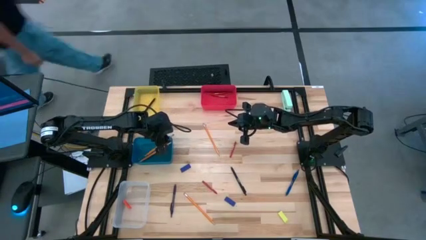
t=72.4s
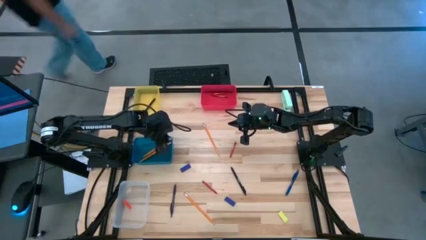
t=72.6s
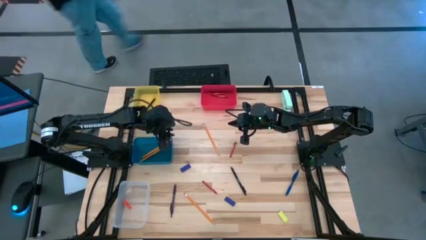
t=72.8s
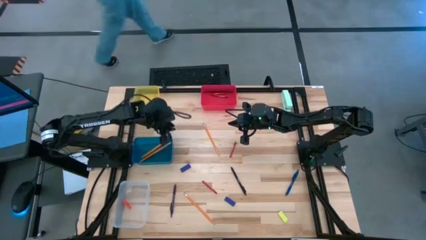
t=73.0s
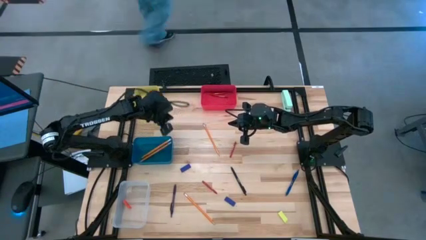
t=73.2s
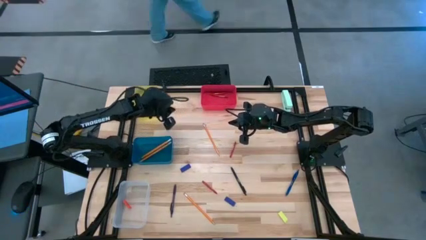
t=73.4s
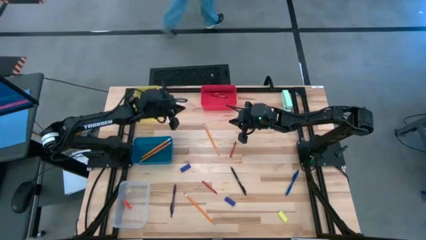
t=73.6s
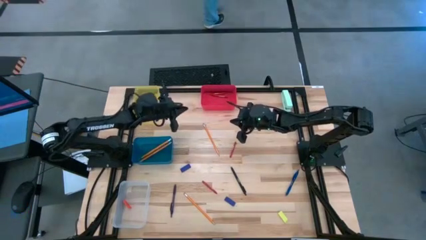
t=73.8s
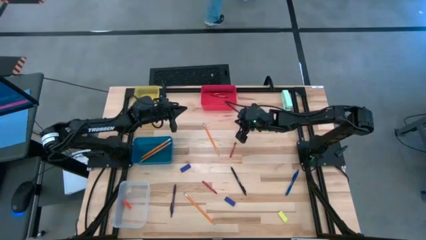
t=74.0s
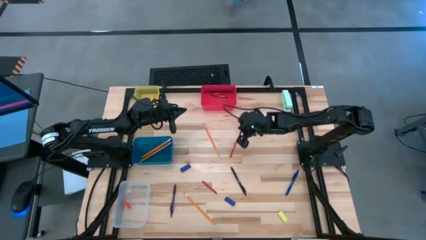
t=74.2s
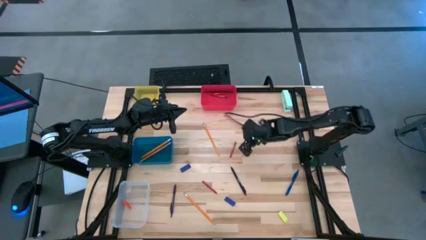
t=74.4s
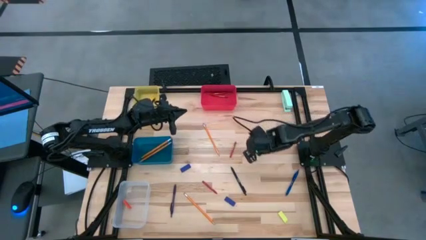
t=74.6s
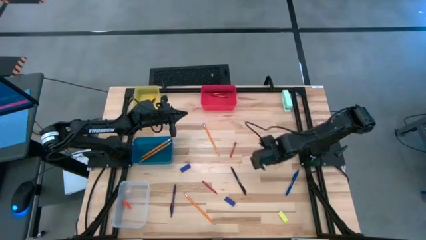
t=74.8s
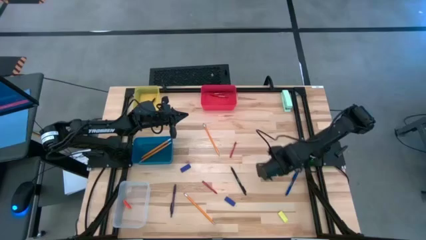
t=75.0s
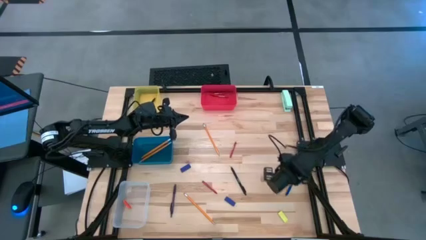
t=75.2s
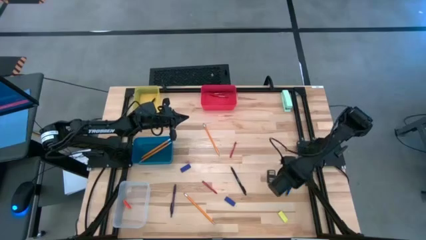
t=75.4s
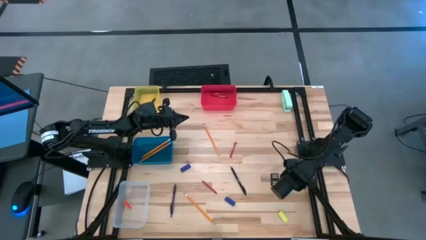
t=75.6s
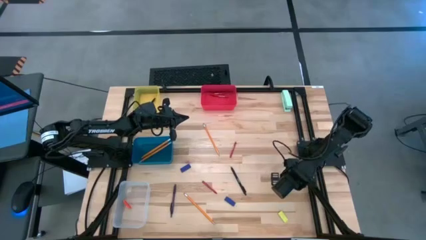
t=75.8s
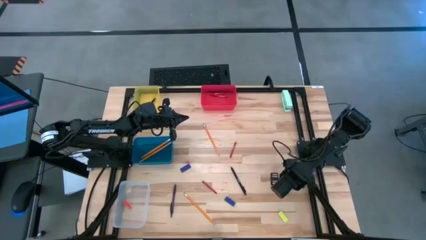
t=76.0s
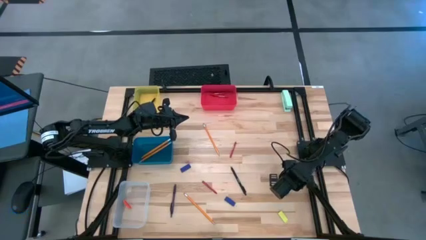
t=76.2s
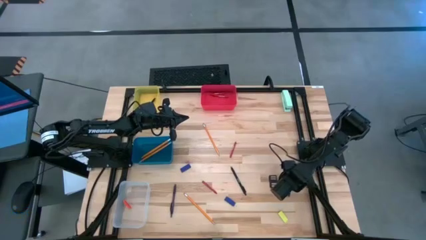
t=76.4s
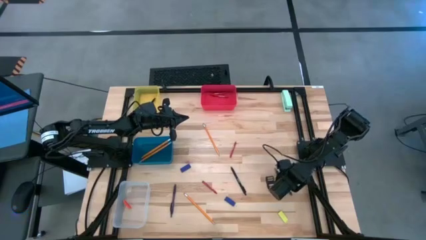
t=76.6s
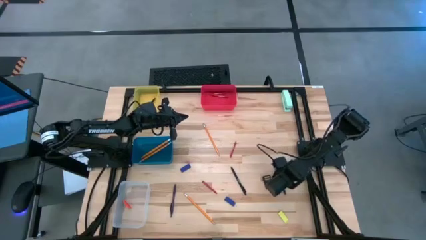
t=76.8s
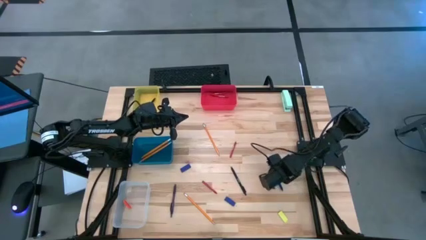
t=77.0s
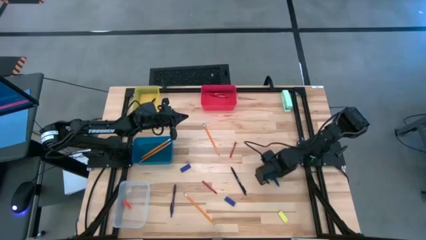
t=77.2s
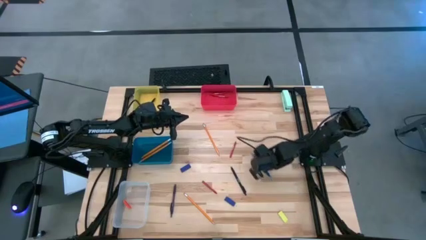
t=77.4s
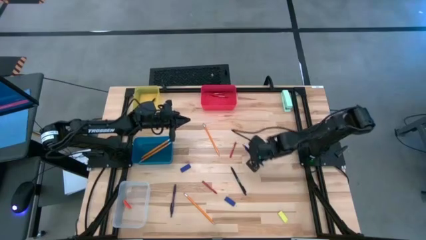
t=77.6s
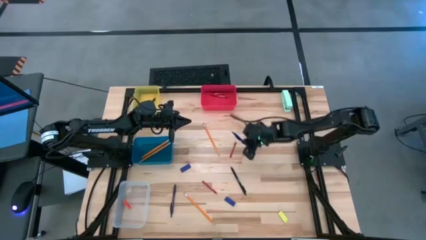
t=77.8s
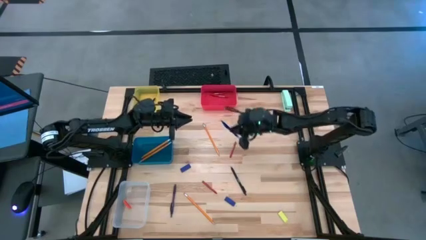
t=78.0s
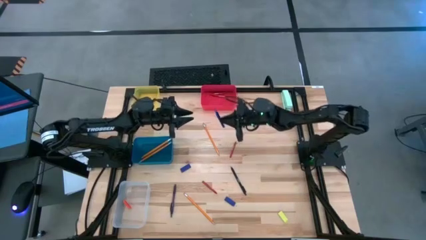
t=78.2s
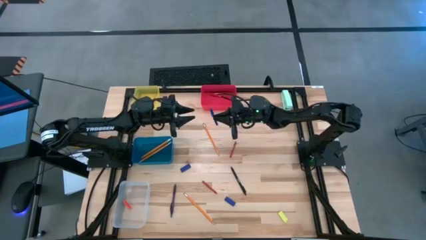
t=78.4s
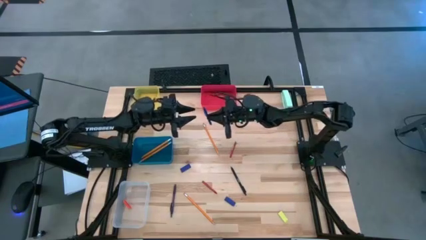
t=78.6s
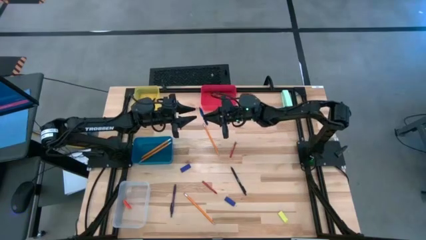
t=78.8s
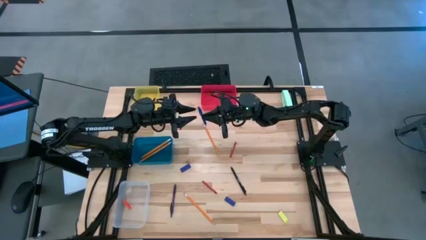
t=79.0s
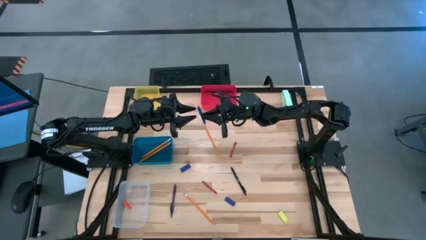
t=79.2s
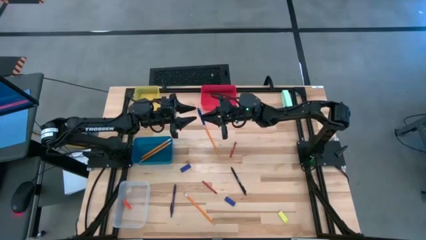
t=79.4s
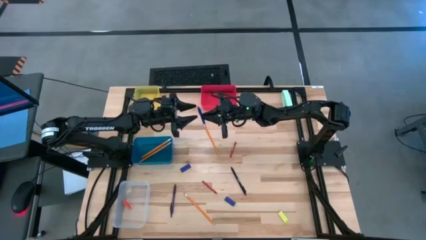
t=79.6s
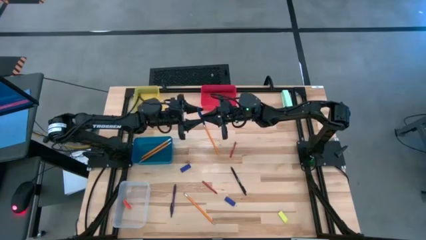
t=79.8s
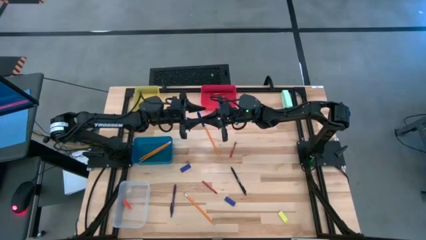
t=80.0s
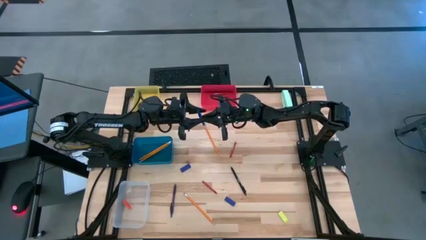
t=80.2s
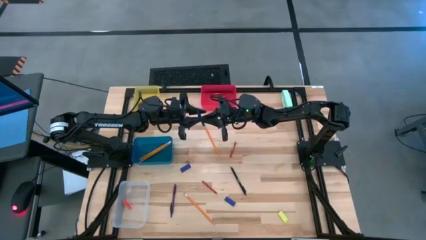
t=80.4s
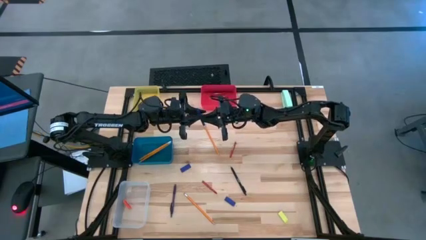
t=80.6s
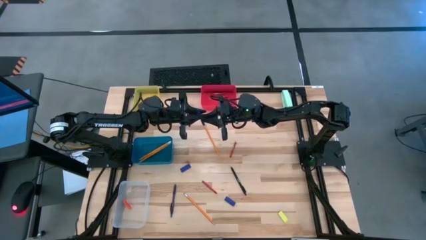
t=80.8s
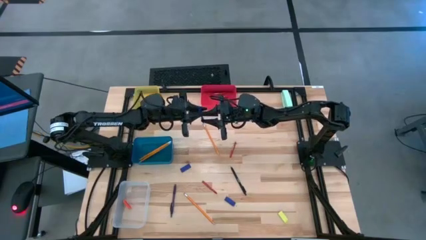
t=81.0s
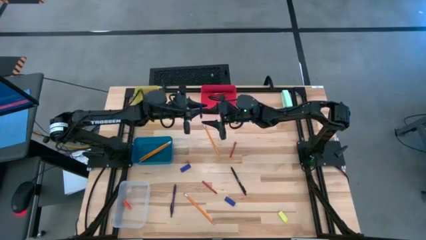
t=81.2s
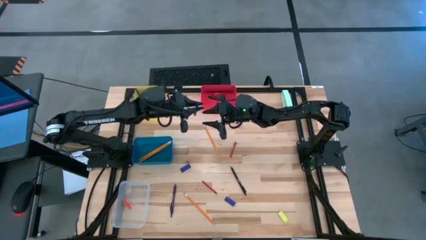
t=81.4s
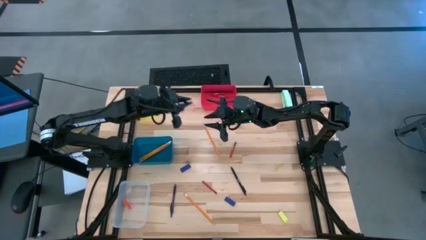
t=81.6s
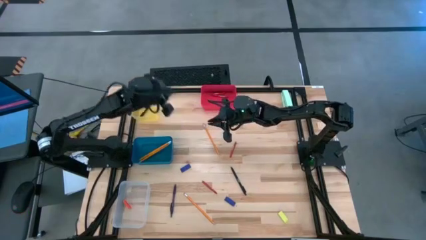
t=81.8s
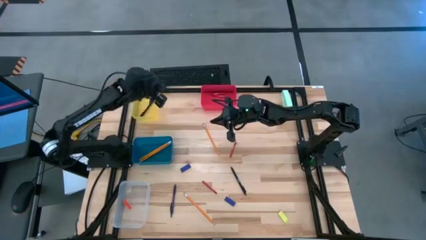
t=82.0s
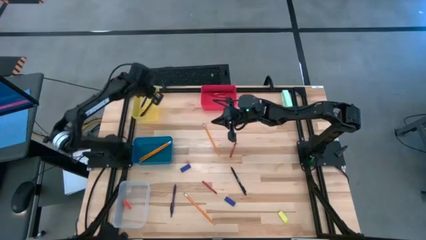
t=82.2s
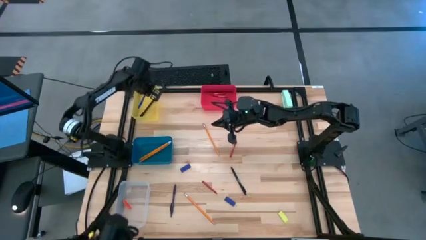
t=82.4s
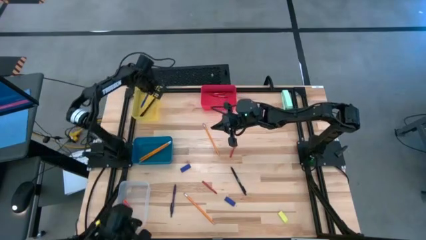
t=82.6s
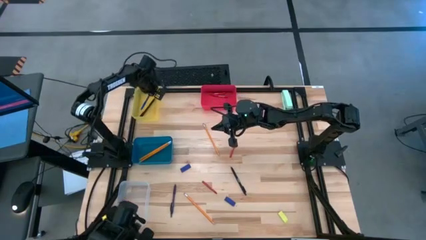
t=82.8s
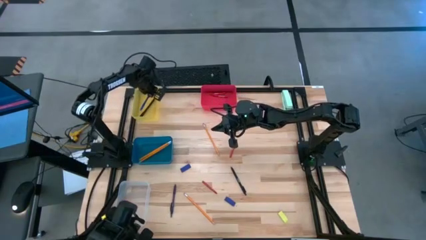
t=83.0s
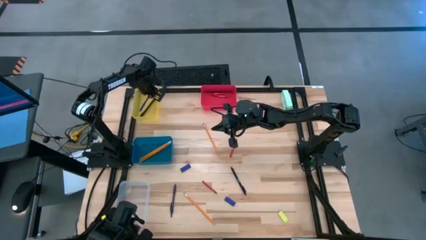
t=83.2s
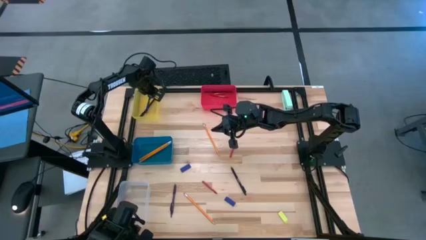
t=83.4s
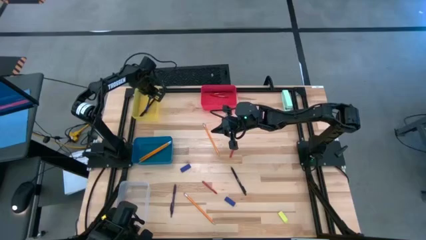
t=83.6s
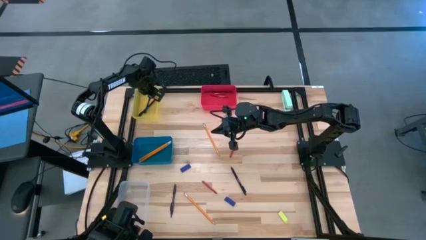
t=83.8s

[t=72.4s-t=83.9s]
Task: Sort crayons/erasers/pens/pencils in bins
Put the blue pen into the yellow bin

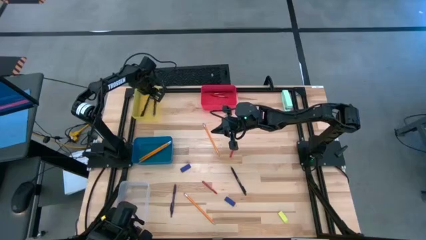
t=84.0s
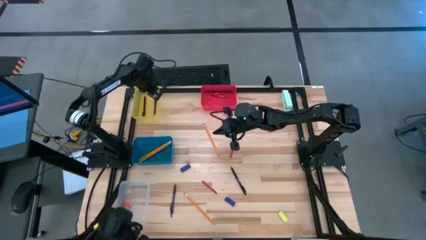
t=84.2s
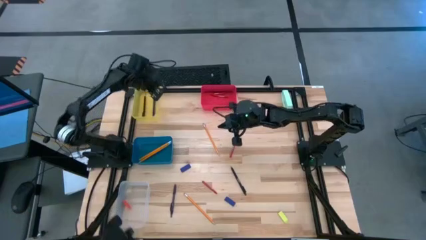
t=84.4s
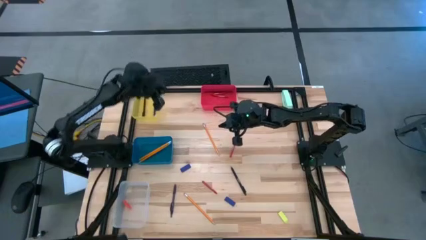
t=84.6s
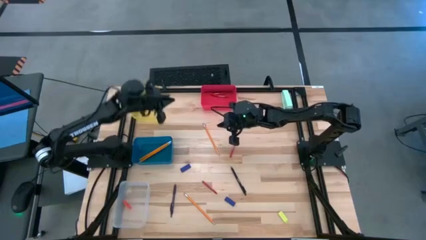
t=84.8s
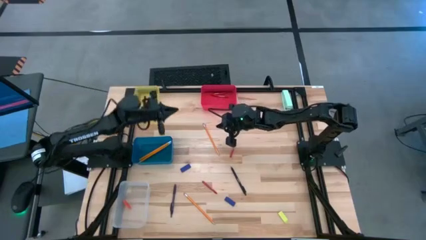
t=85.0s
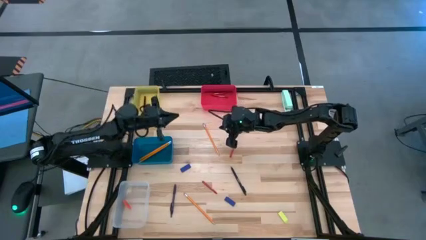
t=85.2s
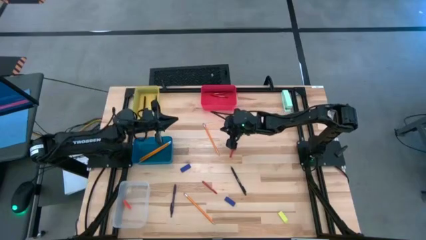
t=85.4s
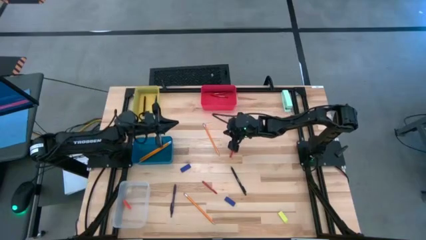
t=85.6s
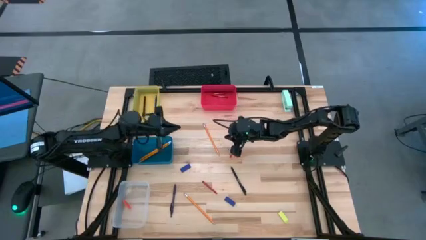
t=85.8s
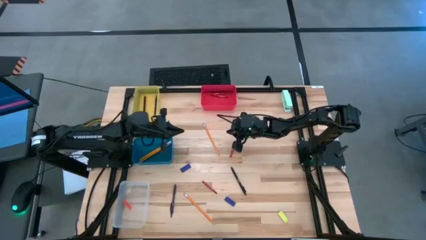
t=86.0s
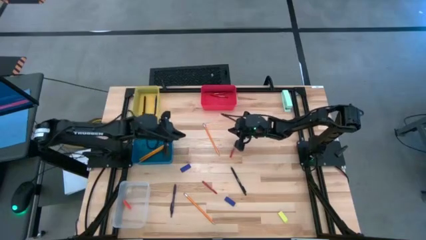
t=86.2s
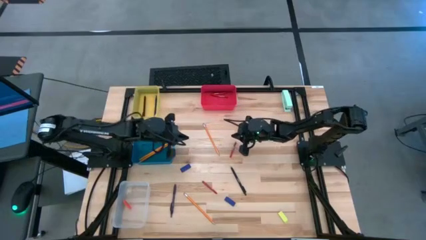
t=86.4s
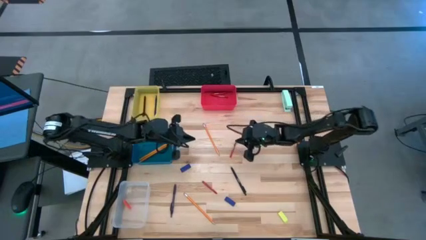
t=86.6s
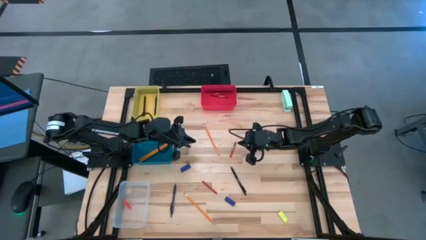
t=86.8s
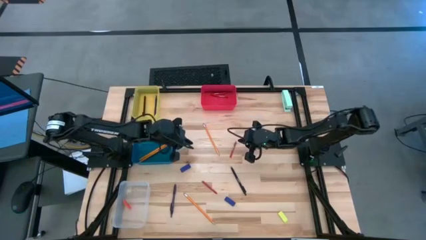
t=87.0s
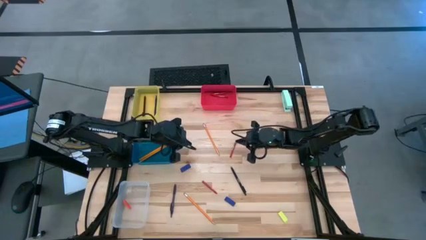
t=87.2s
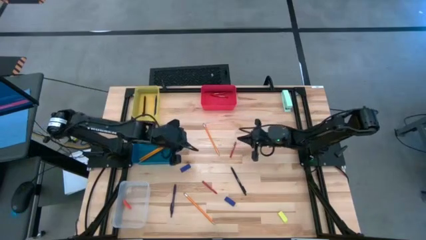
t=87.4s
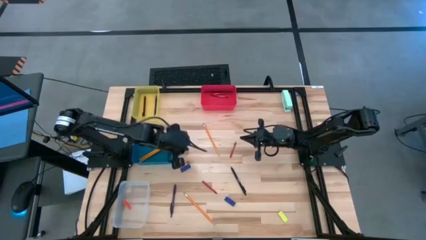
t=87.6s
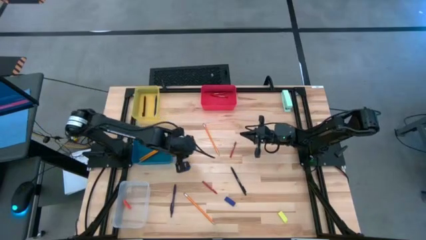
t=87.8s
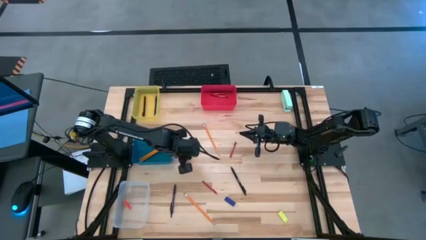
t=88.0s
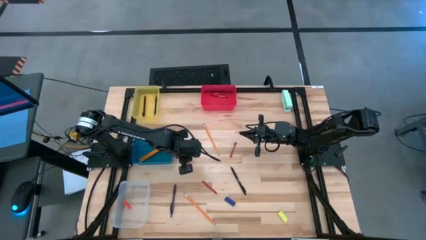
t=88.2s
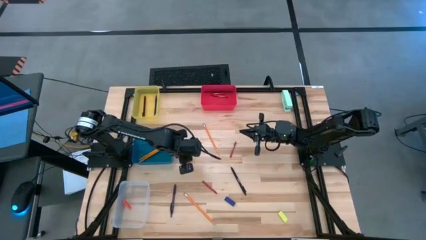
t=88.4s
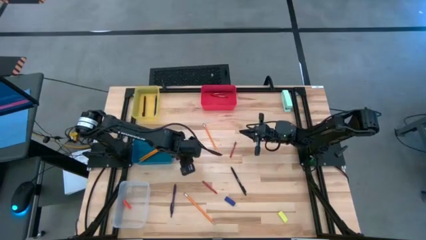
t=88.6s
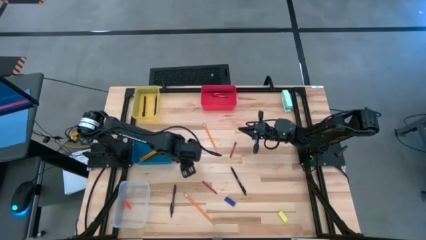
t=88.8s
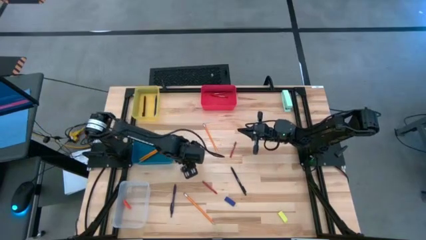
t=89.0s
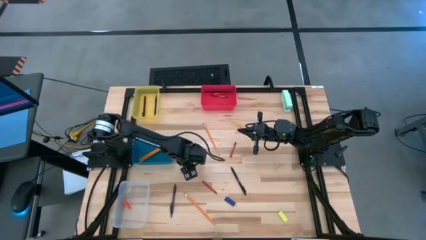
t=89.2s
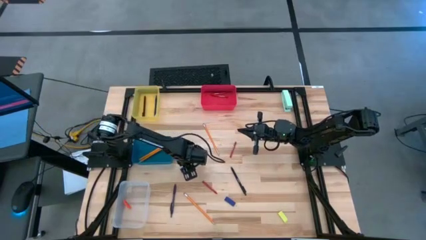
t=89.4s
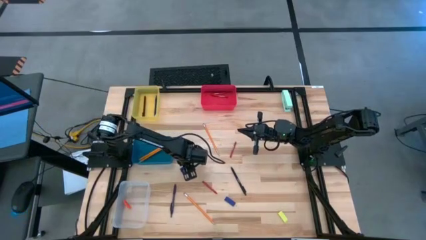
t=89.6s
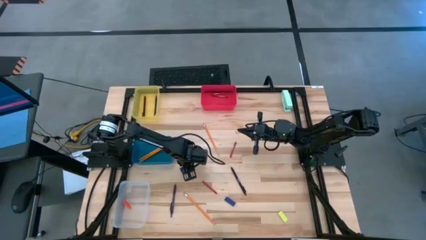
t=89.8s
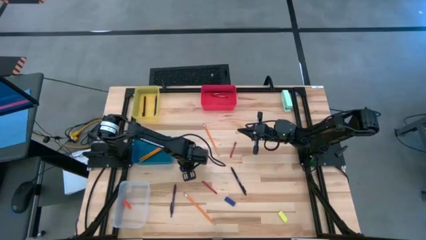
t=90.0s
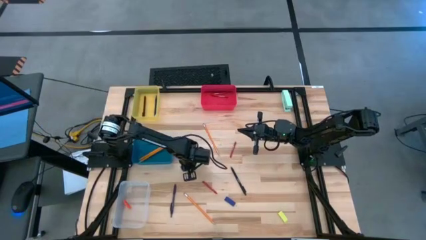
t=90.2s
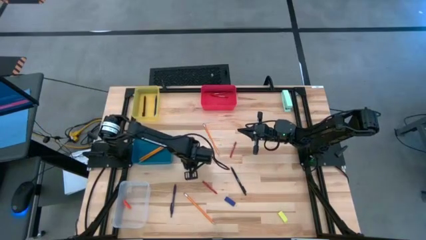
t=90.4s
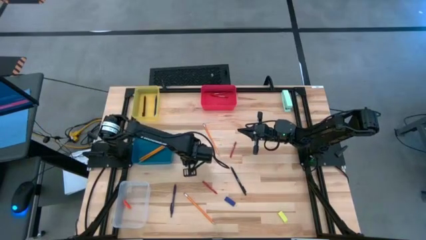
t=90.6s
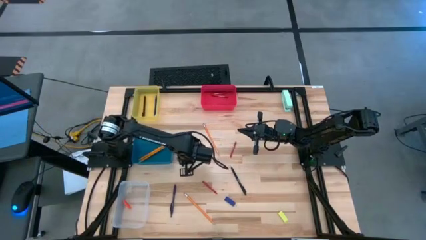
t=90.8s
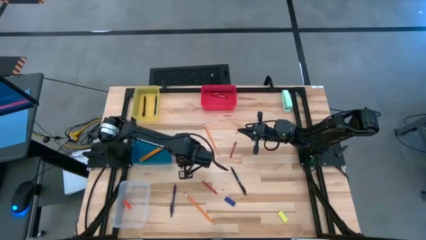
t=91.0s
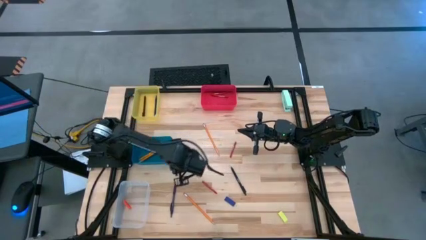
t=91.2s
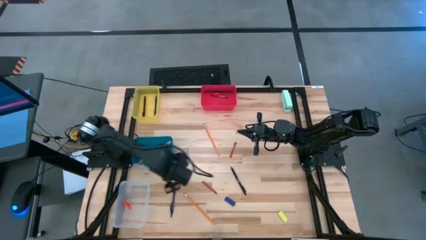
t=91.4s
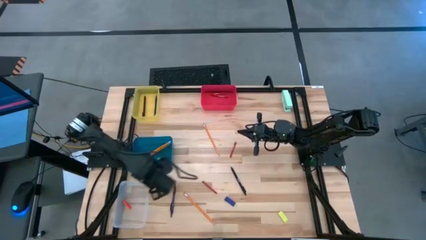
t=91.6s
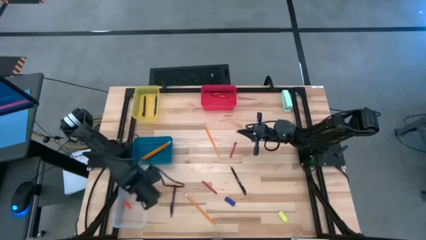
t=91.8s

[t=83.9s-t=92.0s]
Put the blue eraser into the transparent bin
